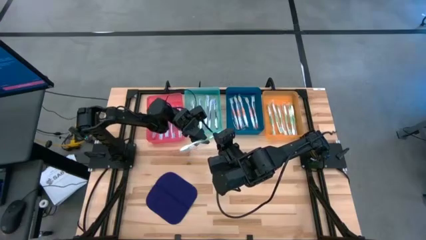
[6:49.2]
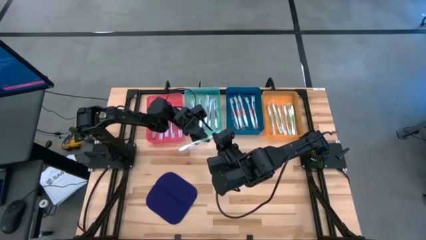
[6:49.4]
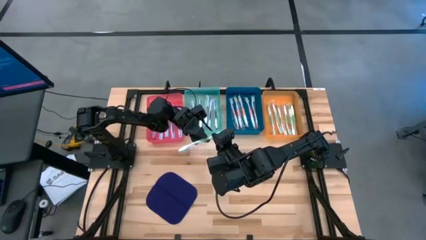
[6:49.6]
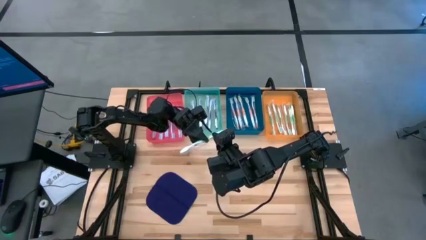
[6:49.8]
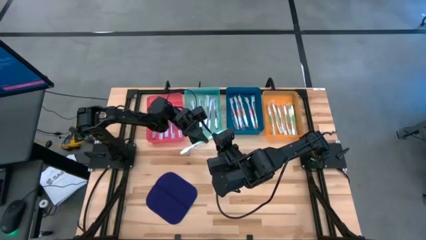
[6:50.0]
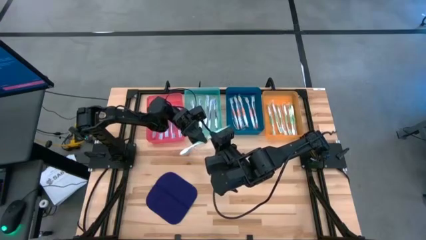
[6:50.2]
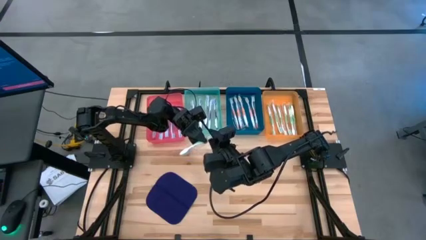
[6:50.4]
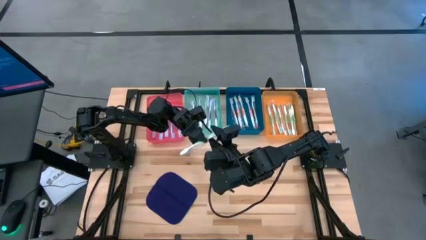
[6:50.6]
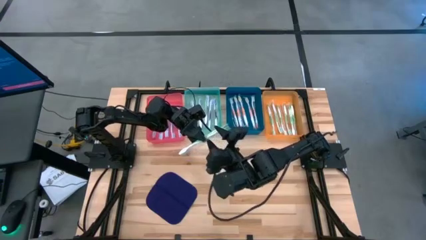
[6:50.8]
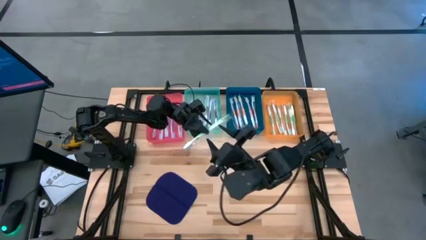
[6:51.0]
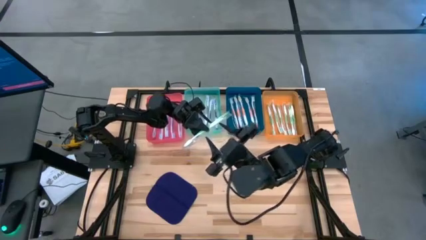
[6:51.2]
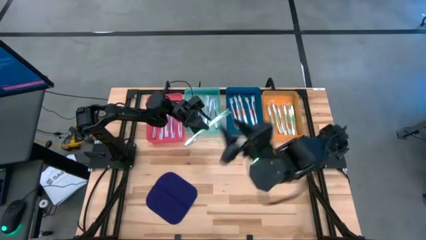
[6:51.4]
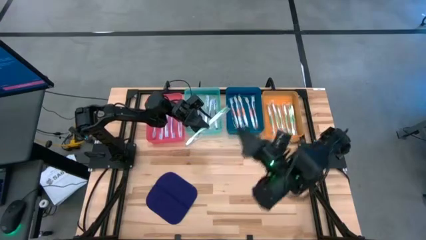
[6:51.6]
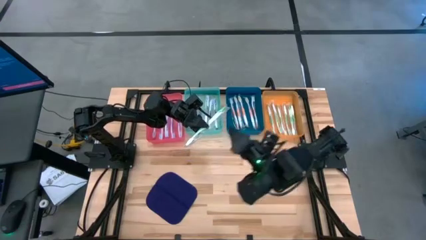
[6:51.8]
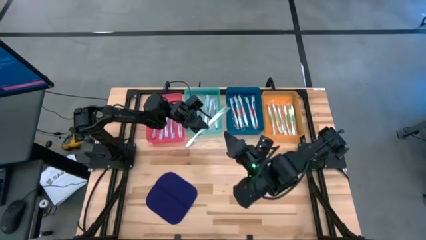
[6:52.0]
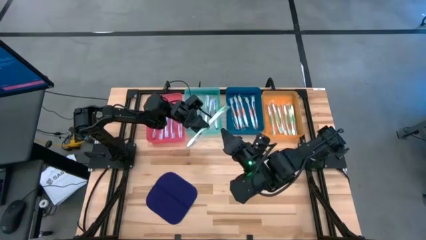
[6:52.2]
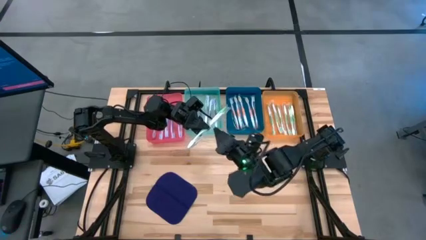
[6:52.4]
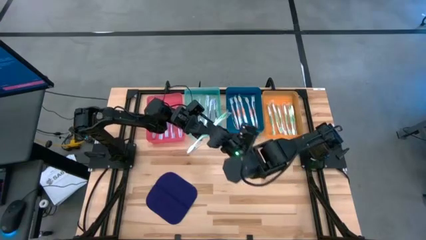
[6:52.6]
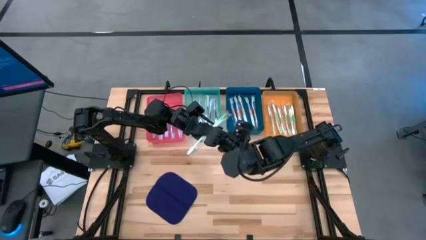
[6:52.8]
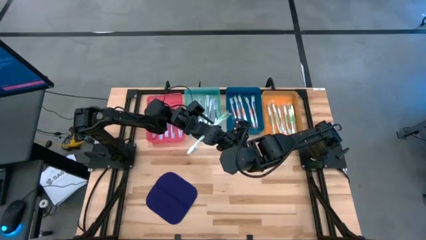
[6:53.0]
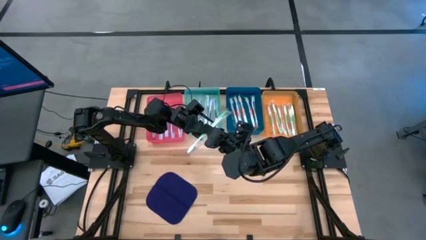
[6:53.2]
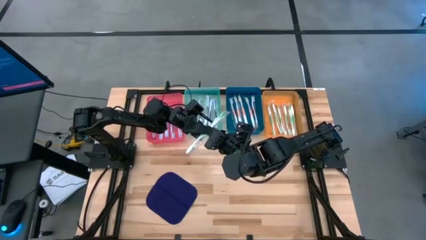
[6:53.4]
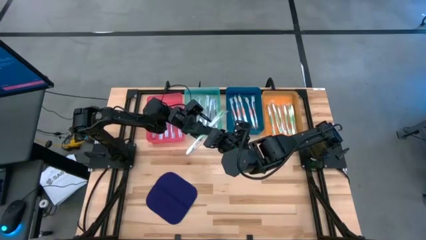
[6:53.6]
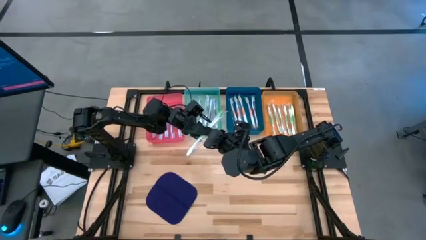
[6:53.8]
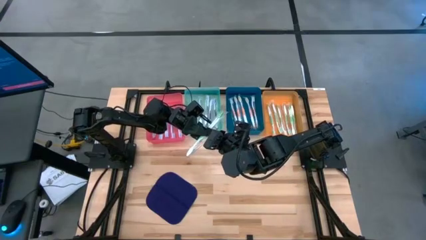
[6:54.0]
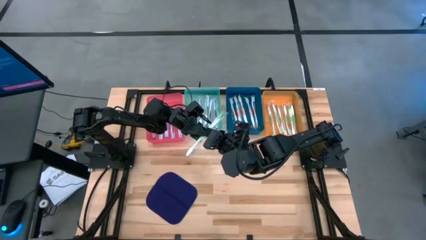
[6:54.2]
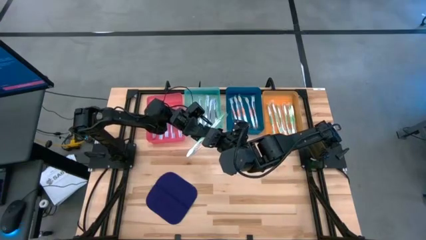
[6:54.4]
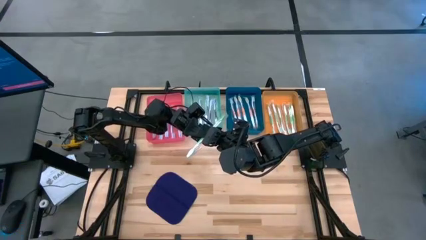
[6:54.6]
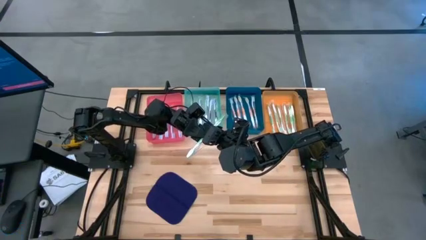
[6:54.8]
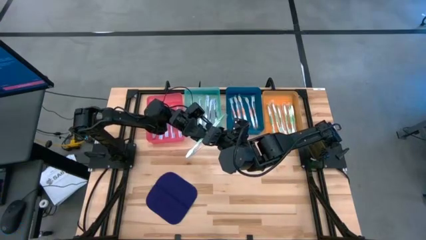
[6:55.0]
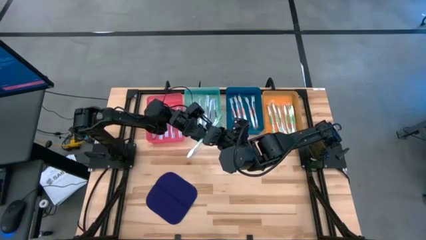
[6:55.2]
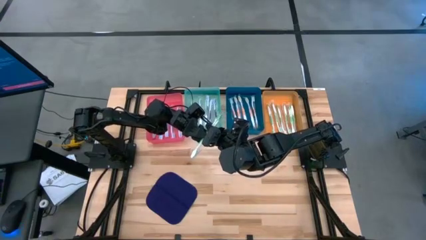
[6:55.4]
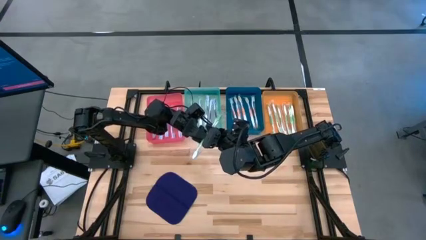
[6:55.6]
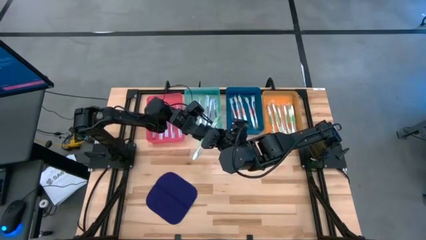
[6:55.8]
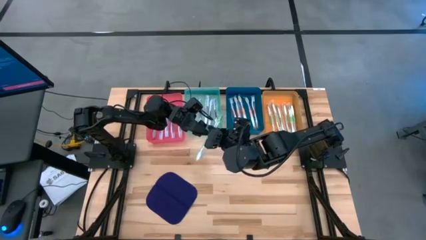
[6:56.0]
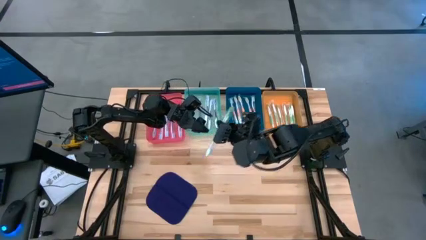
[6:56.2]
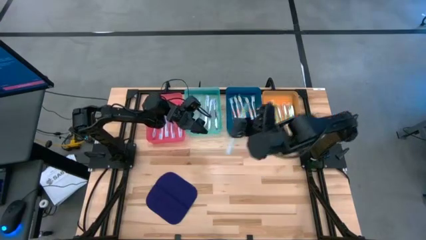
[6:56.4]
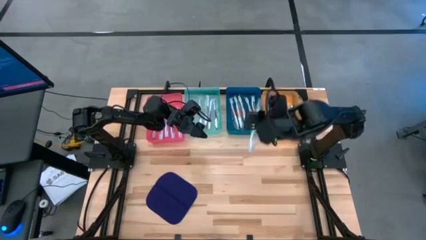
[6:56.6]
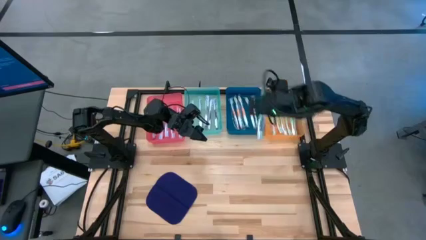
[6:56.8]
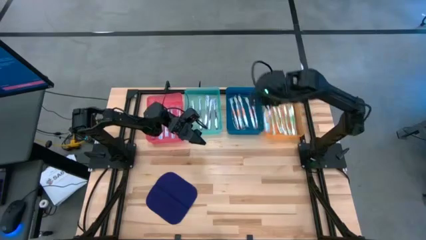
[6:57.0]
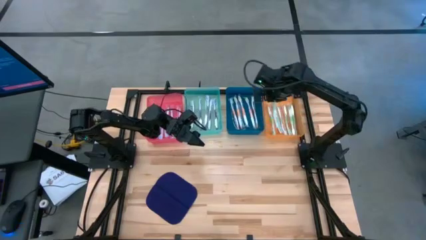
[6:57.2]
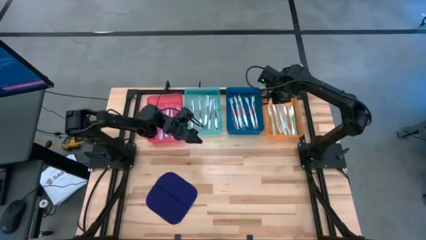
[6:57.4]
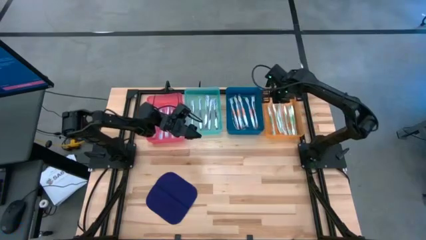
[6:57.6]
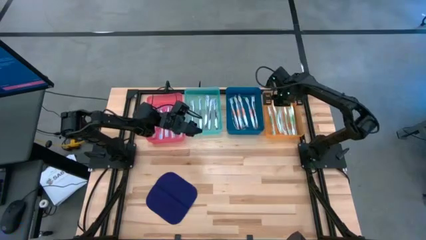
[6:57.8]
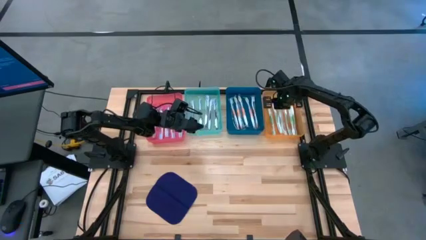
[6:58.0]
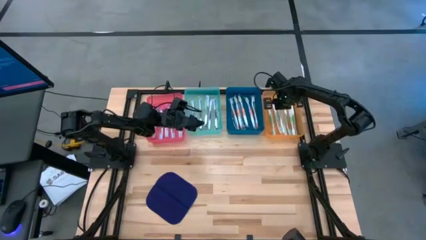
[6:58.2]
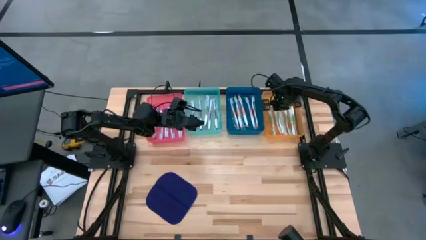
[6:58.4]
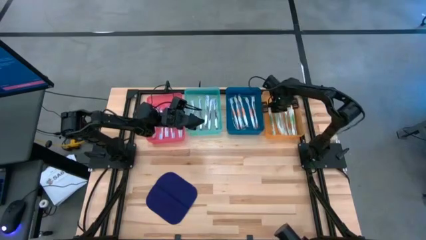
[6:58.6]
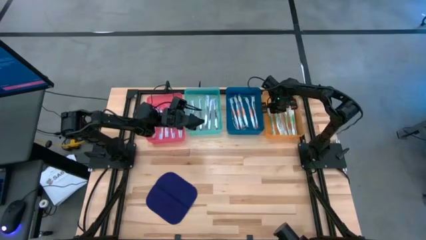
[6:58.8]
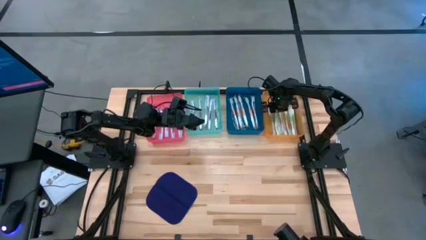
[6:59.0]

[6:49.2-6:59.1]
Task: Pick & Place Toothbrushes
Put the green toothbrush into the orange bin

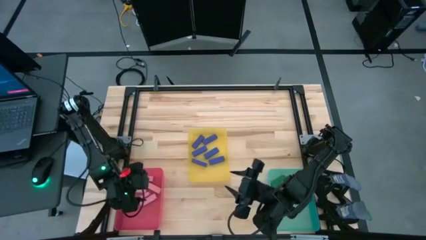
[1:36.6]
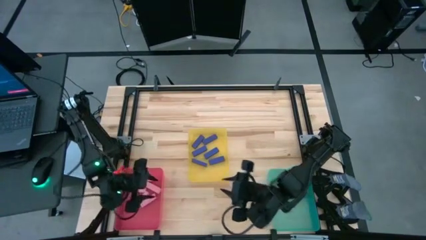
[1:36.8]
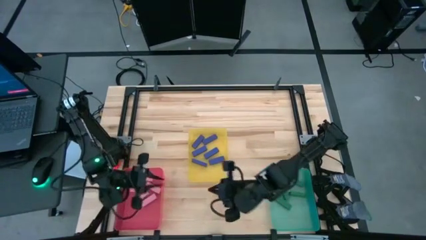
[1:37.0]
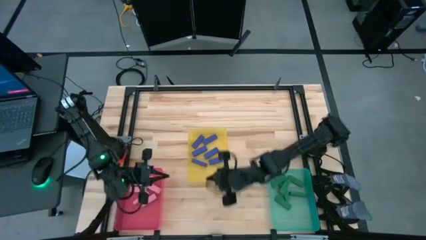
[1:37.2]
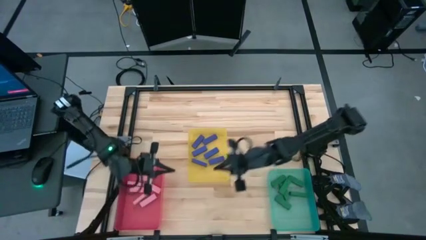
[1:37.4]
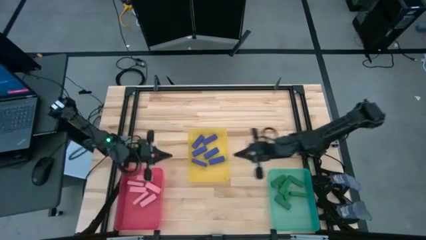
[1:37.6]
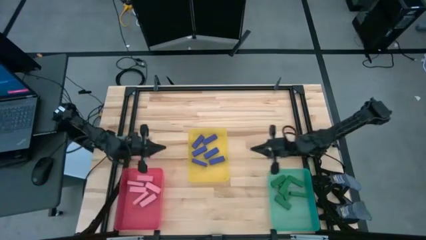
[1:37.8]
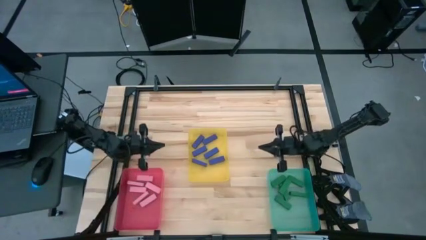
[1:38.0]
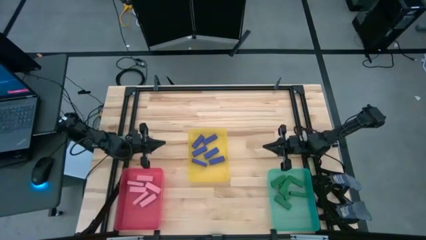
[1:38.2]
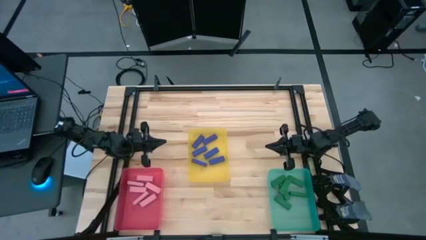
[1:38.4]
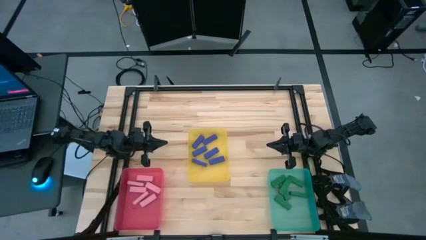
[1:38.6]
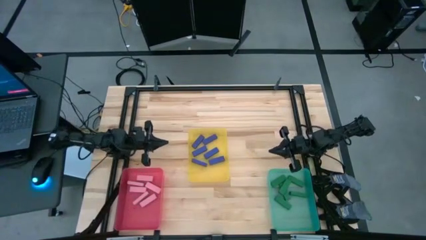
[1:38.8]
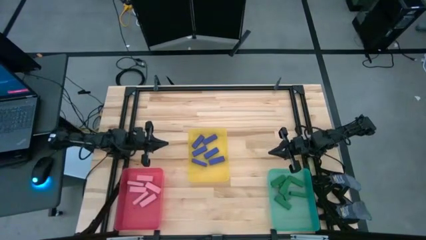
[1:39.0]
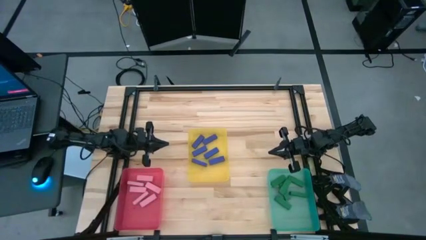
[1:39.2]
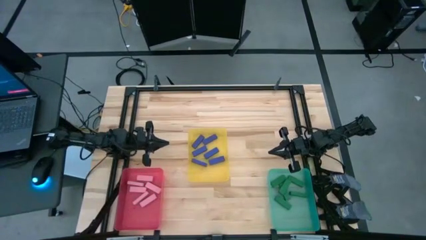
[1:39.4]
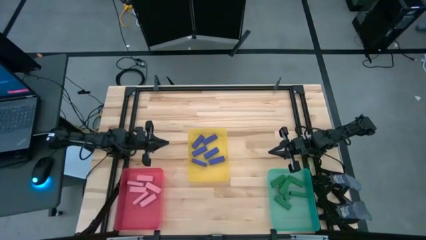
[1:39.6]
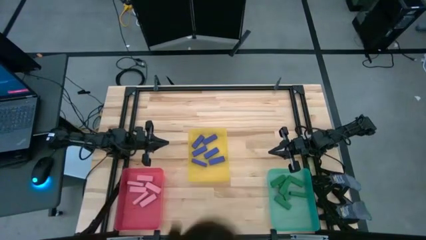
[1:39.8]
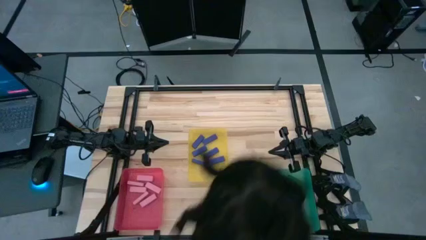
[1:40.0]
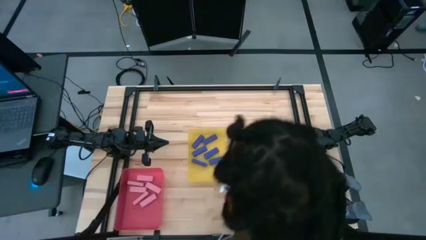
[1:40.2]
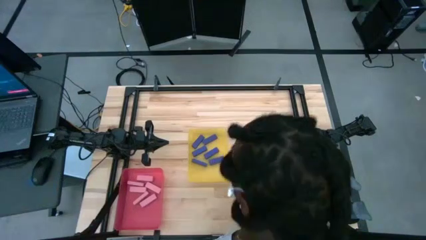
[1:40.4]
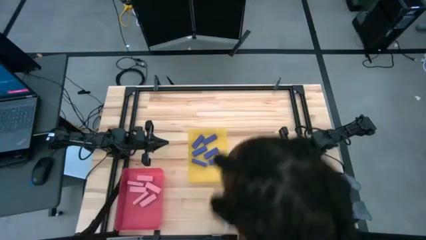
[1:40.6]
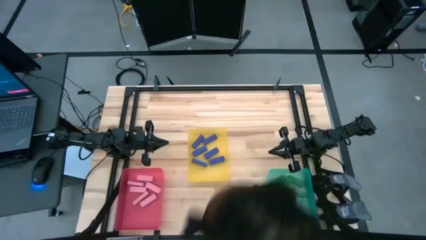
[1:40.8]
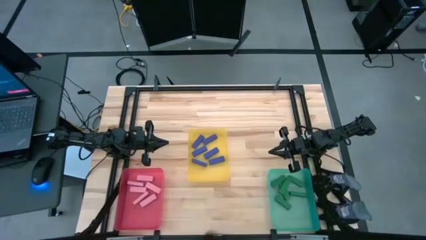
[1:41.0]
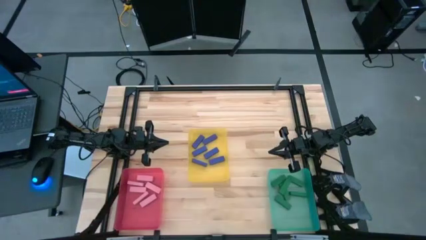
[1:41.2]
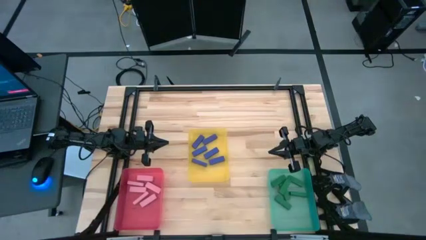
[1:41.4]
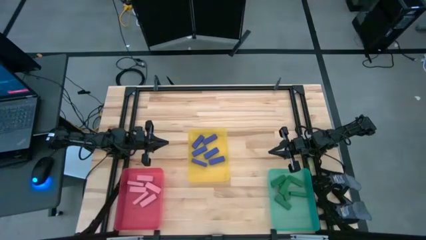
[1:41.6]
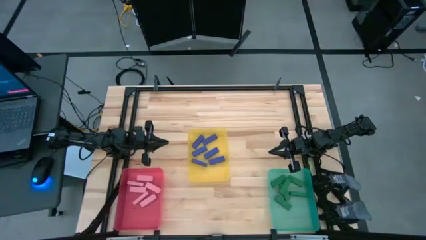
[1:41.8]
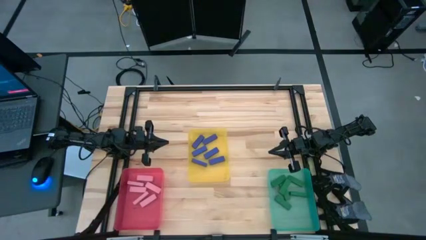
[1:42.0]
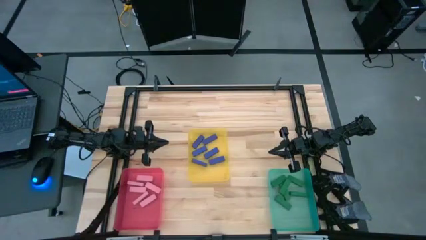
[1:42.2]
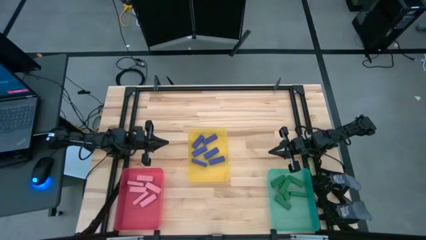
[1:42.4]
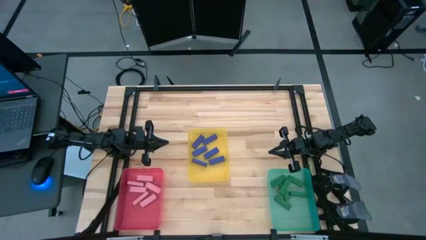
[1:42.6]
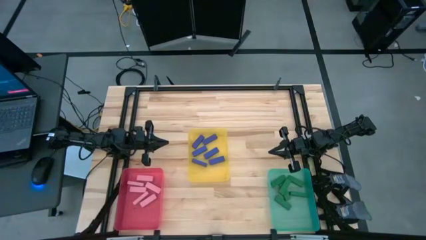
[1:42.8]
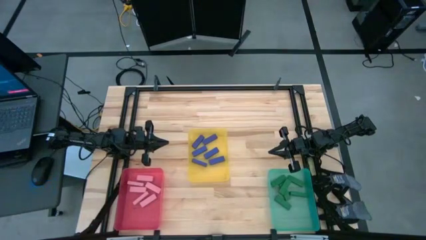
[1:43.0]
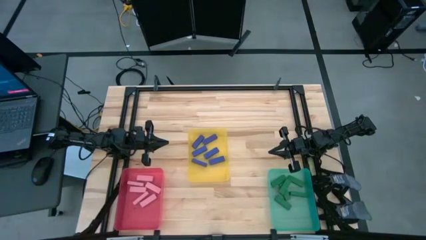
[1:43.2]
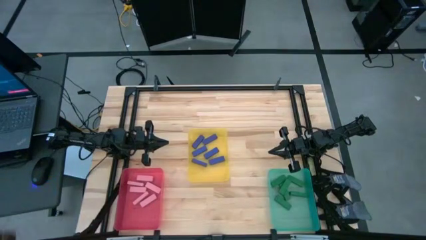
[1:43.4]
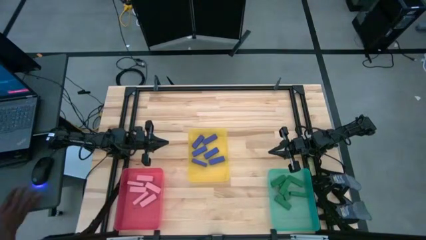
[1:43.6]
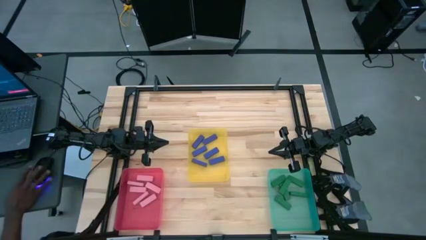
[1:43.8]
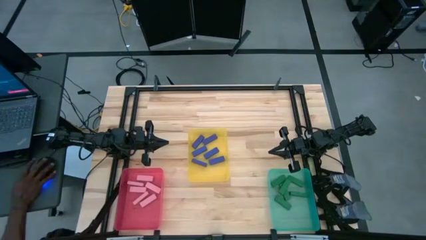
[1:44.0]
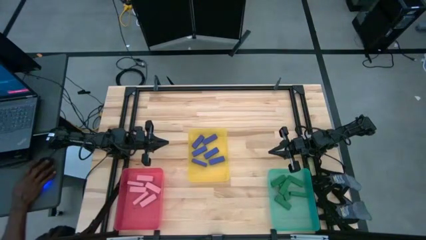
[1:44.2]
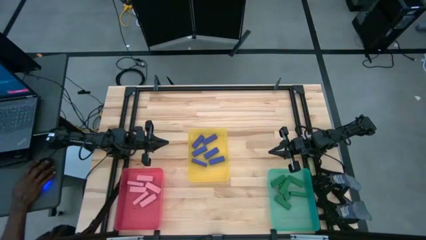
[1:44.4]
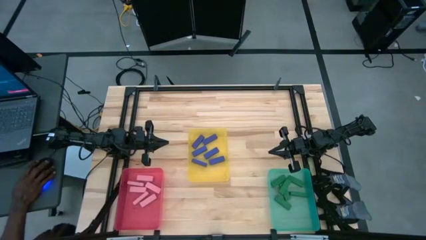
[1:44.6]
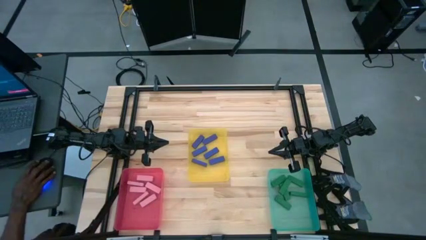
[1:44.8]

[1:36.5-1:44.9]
Task: Sort blocks
Return to Home Position
